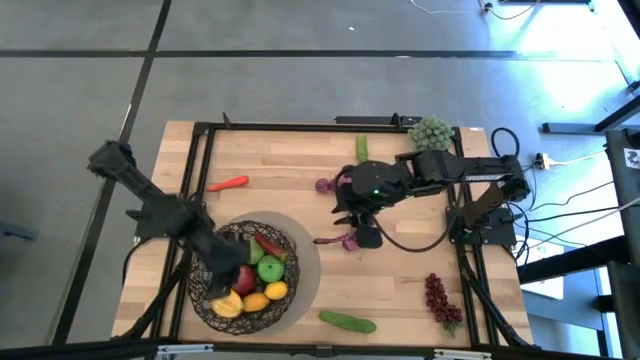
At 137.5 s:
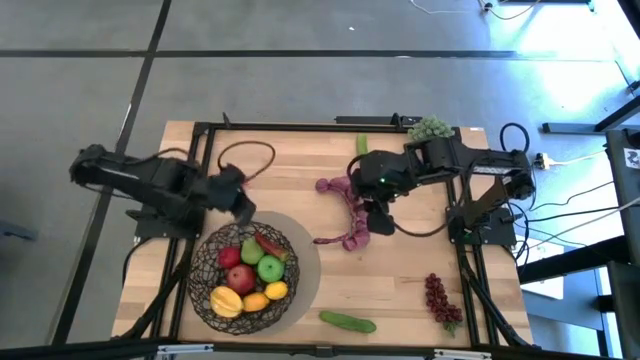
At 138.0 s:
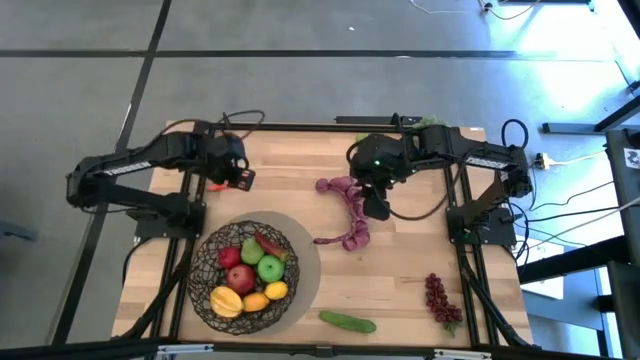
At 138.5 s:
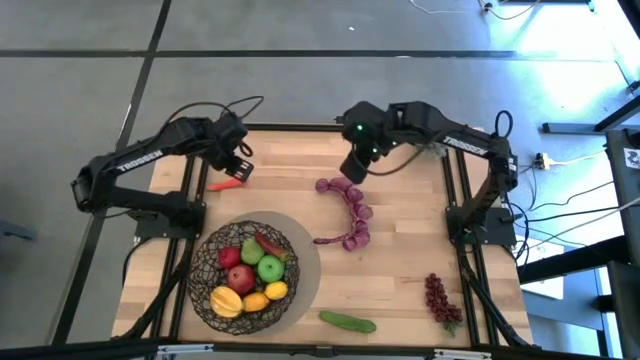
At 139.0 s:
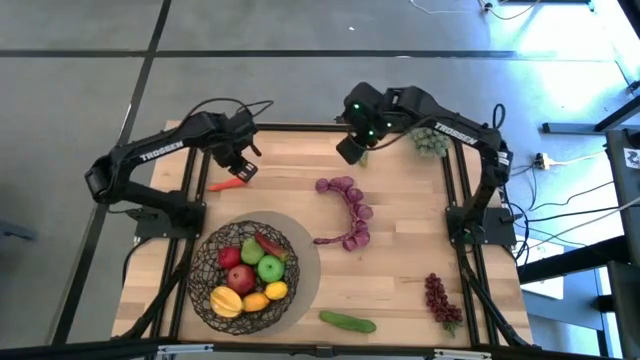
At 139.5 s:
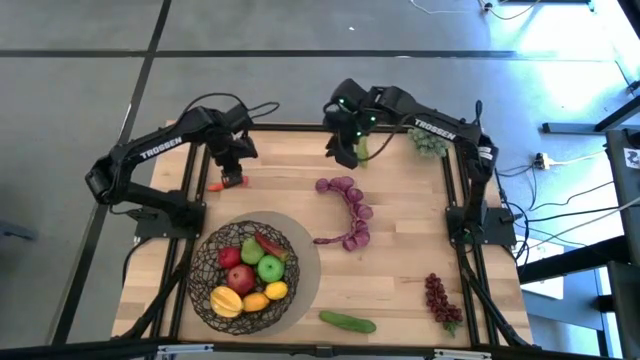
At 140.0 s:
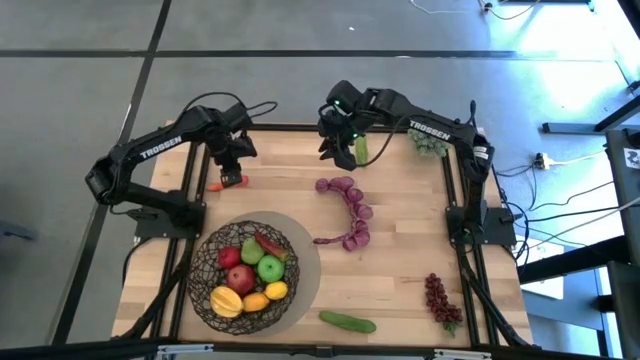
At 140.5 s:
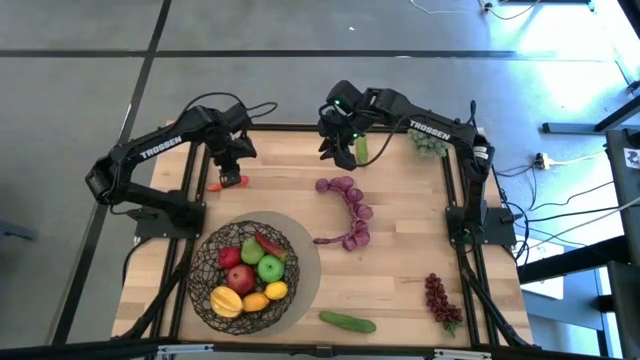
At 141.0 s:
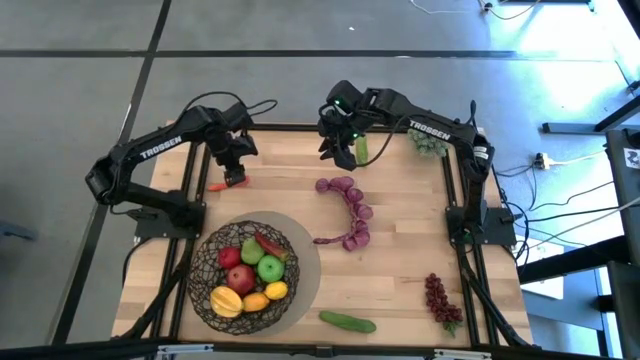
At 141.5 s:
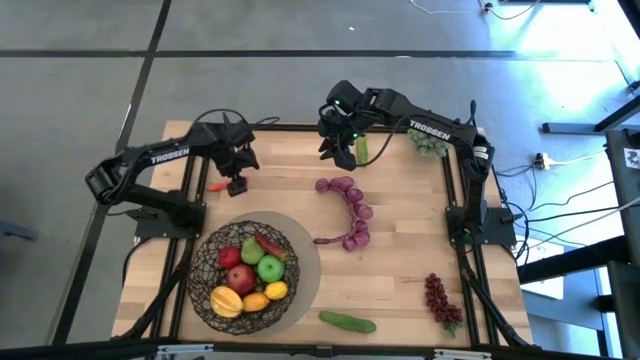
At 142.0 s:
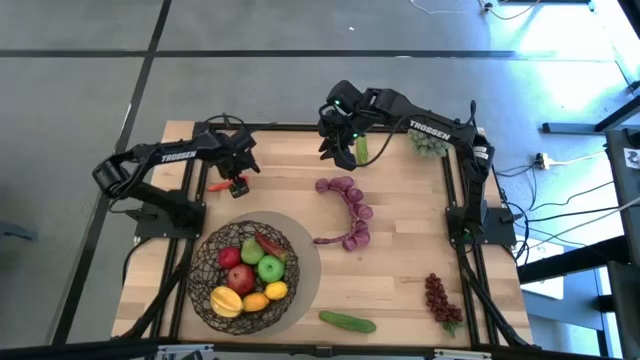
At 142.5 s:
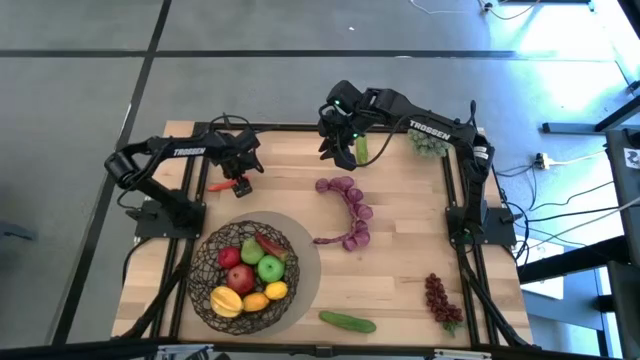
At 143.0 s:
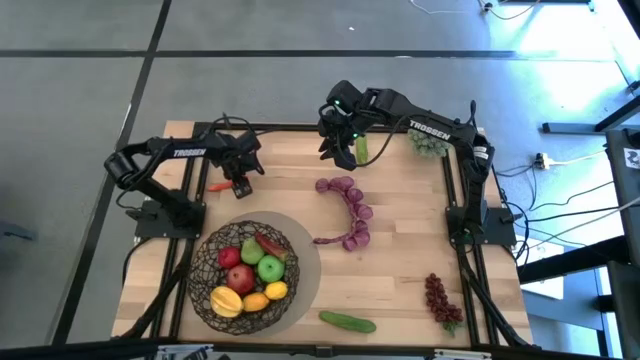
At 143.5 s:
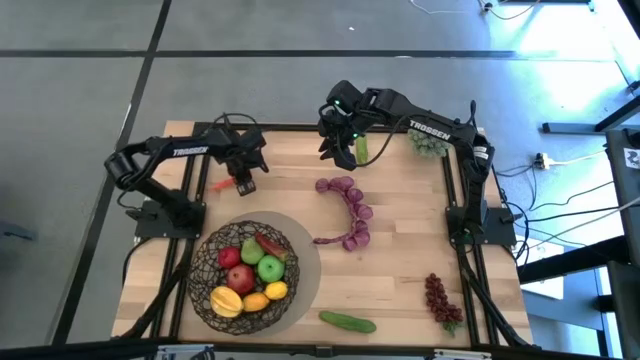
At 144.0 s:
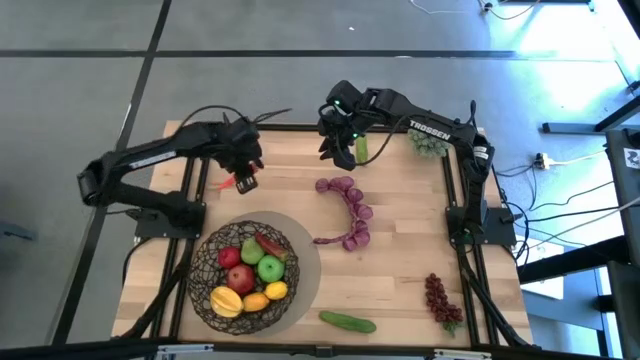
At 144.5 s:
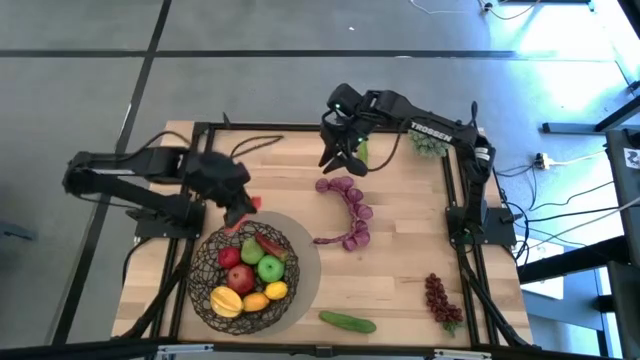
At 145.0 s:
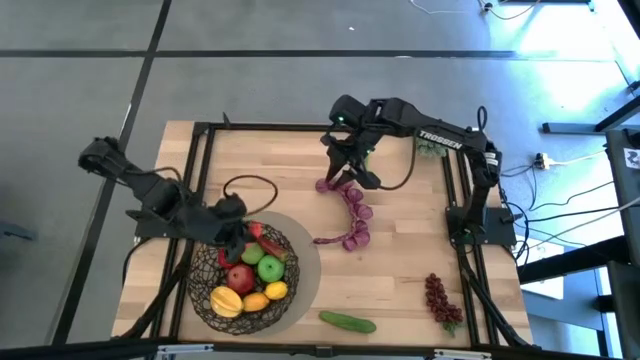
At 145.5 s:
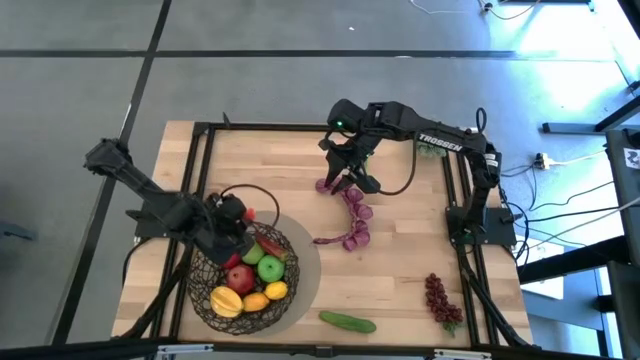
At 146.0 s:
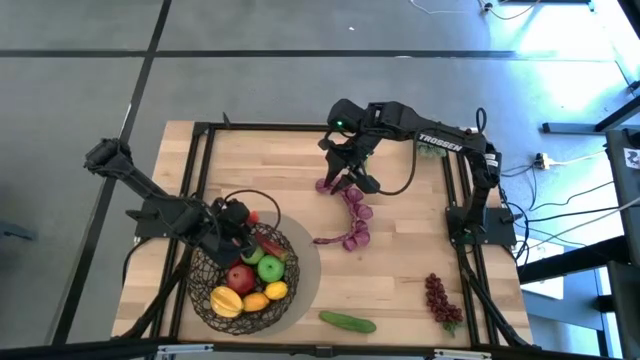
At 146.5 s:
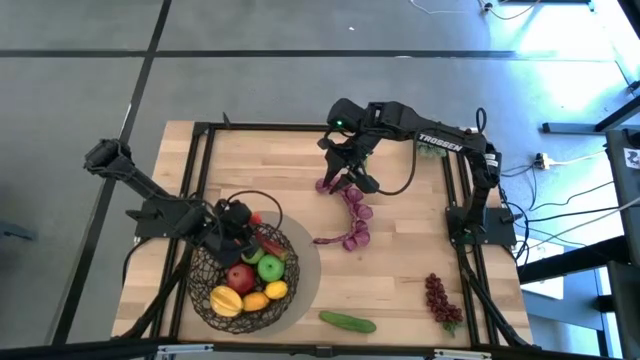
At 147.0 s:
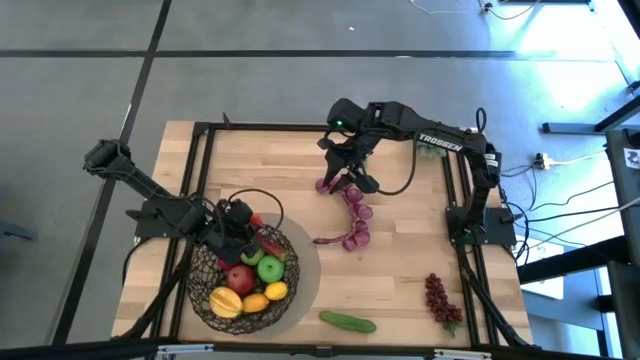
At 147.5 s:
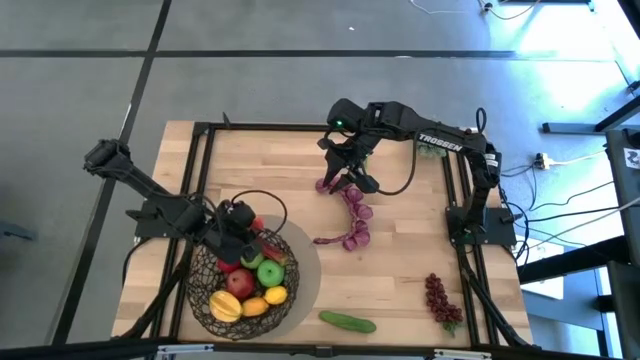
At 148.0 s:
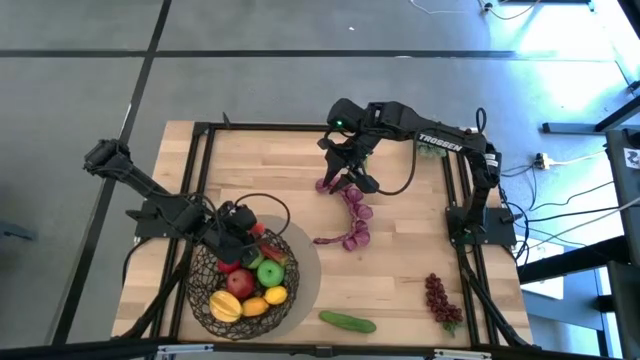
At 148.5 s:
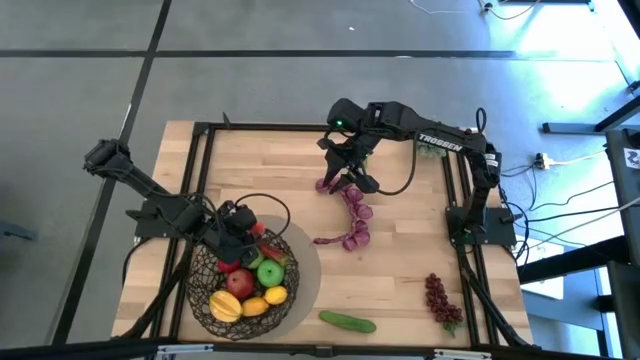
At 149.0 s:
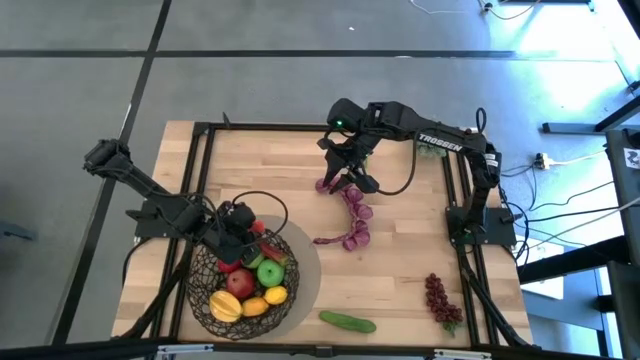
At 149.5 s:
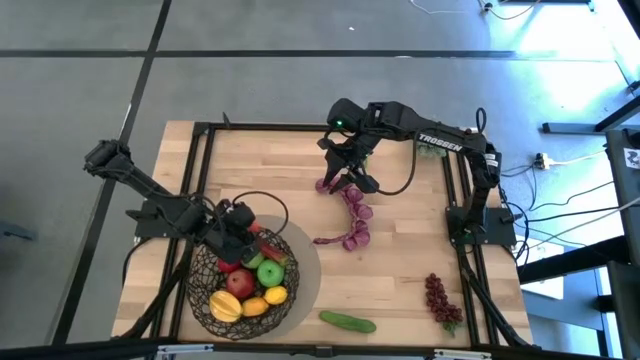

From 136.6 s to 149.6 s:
Task: Build produce basket
Put the orange carrot into the black wire basket

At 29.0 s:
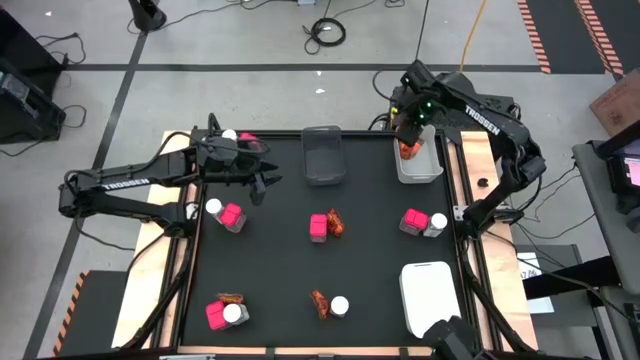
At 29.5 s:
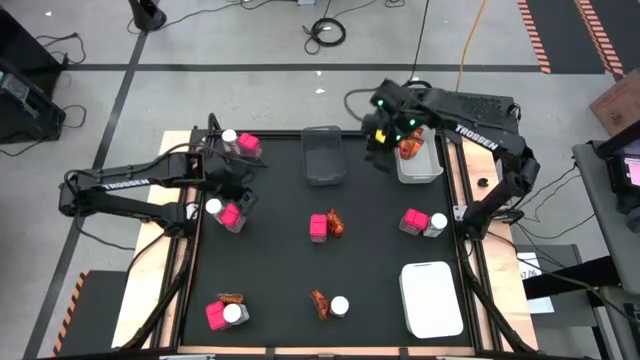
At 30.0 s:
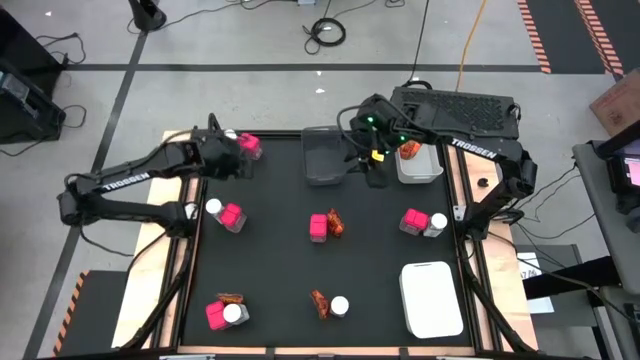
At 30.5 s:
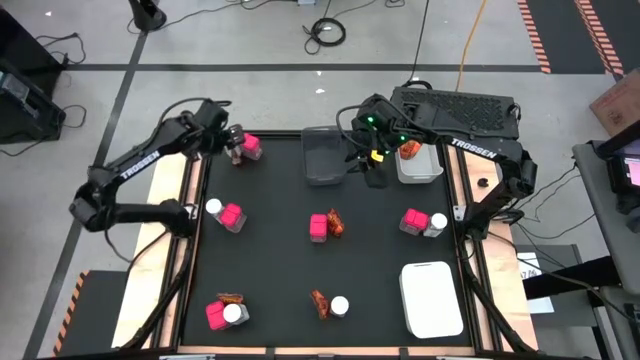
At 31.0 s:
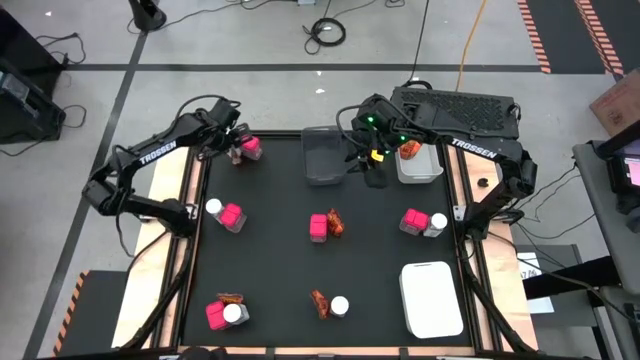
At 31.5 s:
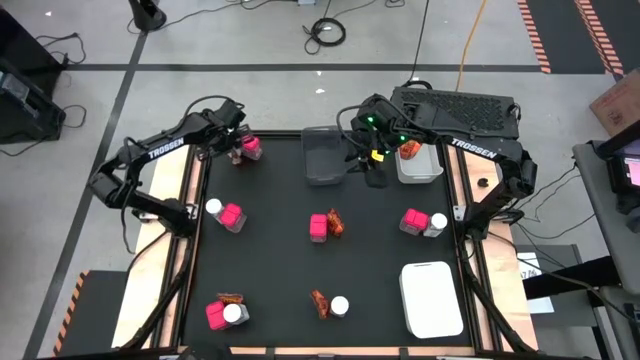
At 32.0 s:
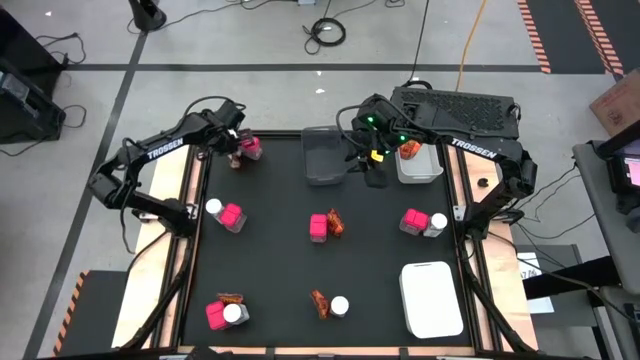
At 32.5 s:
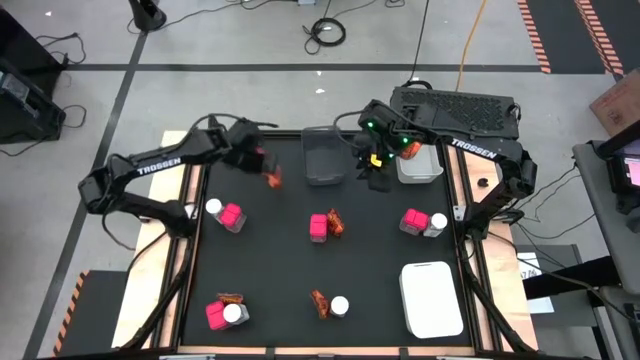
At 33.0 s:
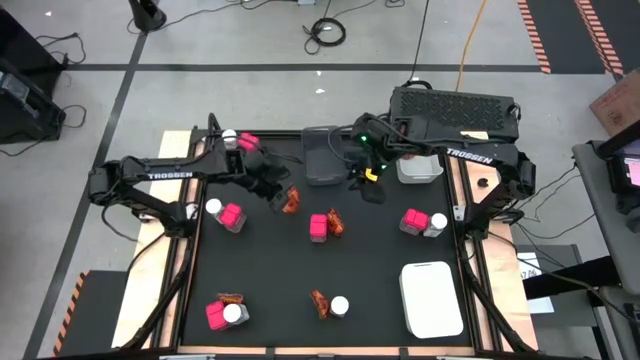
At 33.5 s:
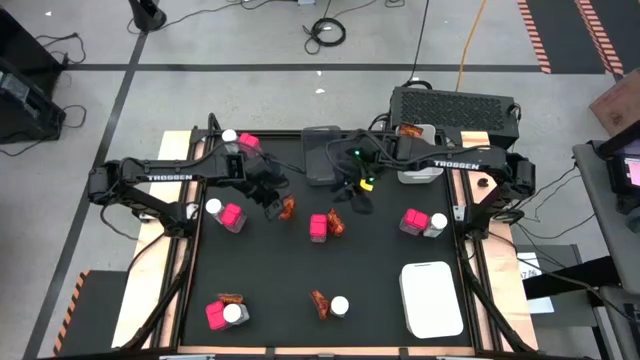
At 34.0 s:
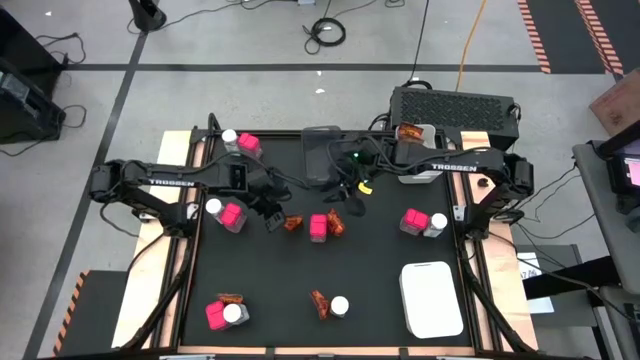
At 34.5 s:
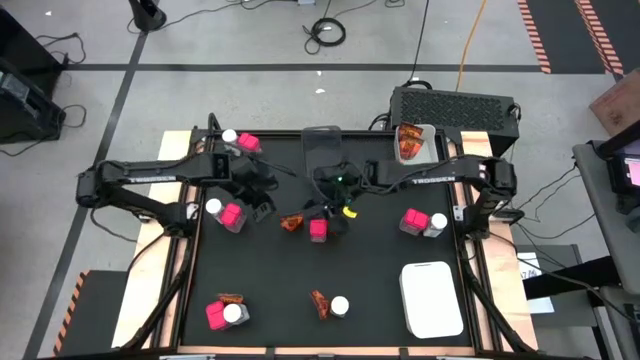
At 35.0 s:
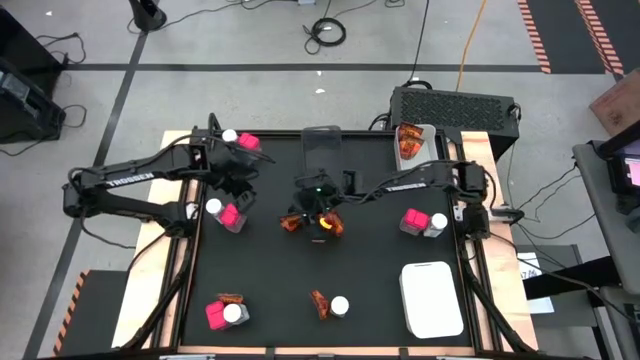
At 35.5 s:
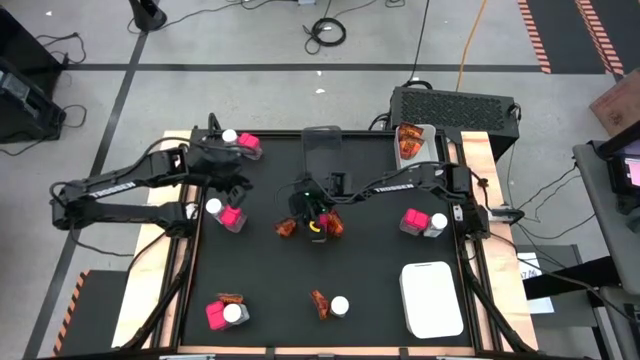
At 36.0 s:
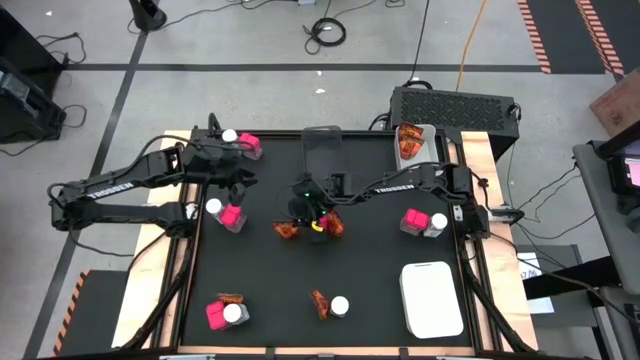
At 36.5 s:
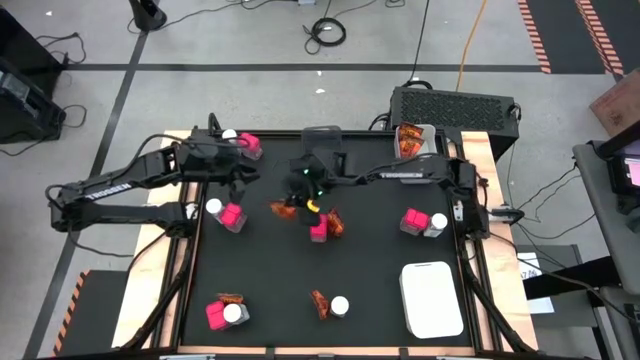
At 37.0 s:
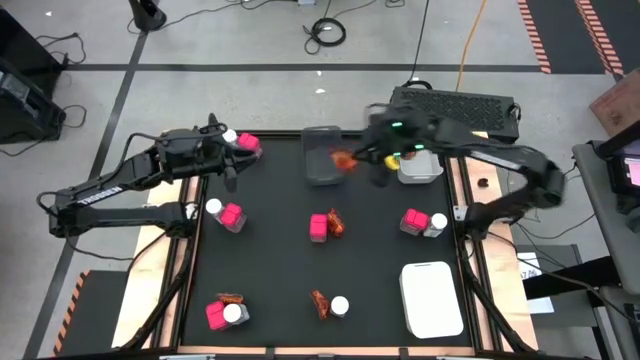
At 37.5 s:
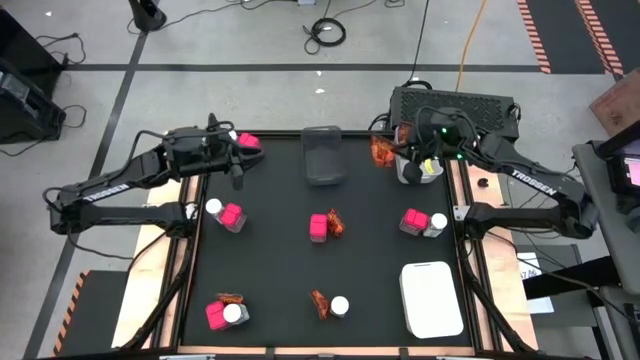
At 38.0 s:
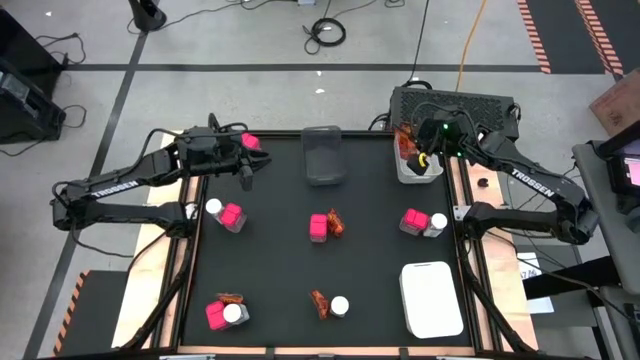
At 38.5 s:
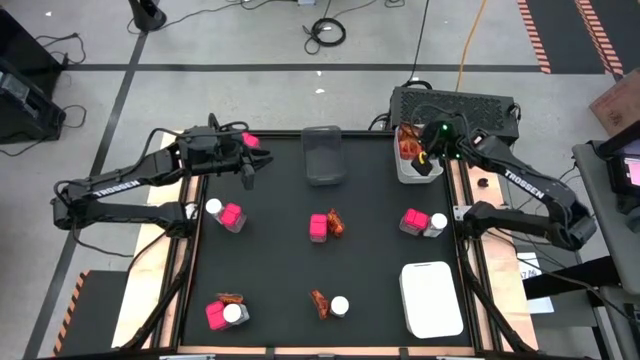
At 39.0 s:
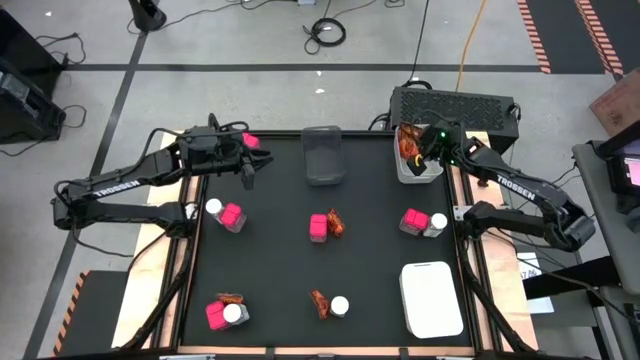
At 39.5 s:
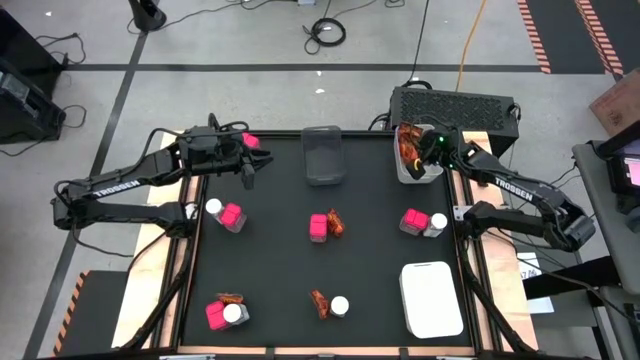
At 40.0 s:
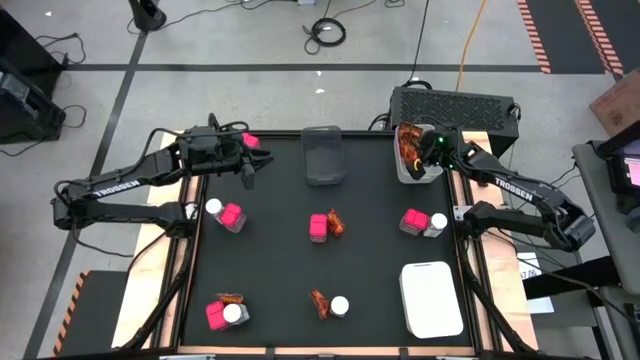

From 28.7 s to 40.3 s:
Task: Sort spices by type
Put the orange seasoning pack into the top white bin
